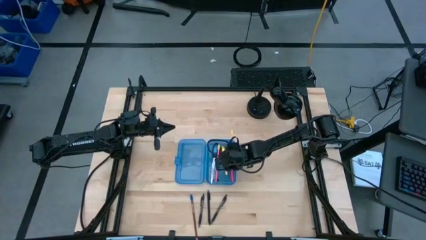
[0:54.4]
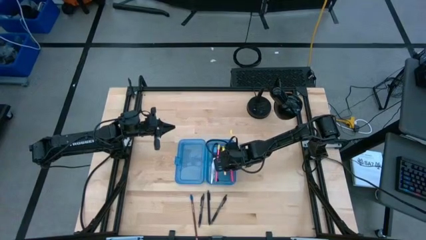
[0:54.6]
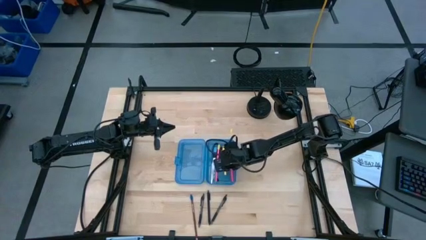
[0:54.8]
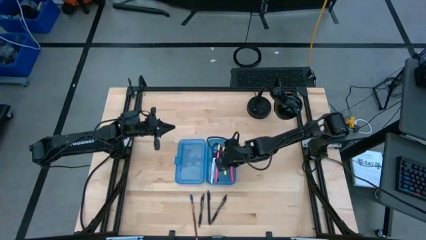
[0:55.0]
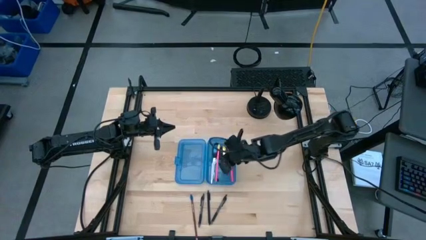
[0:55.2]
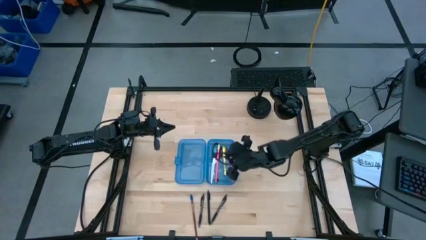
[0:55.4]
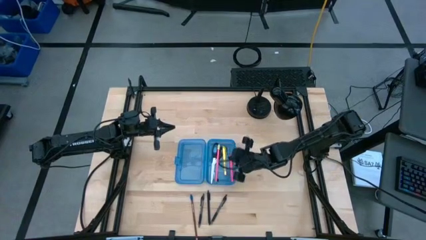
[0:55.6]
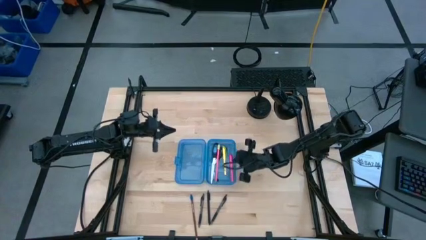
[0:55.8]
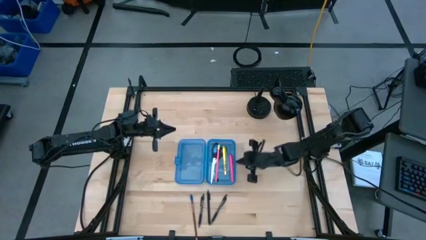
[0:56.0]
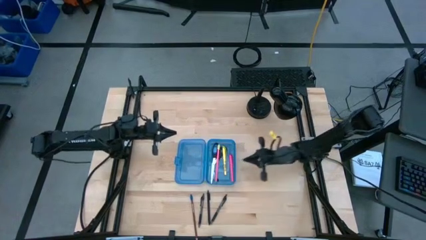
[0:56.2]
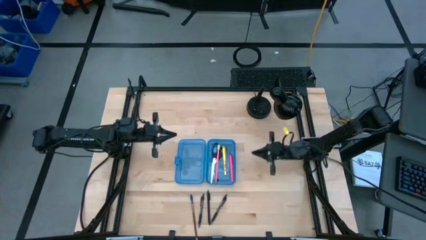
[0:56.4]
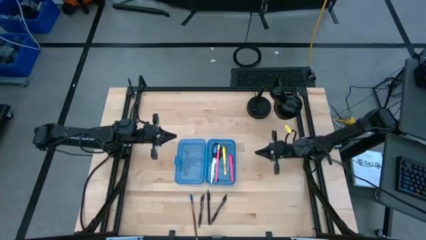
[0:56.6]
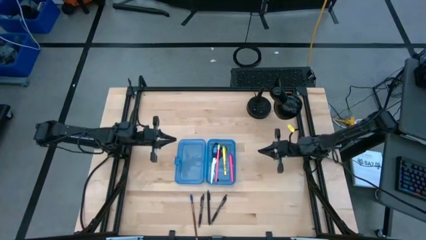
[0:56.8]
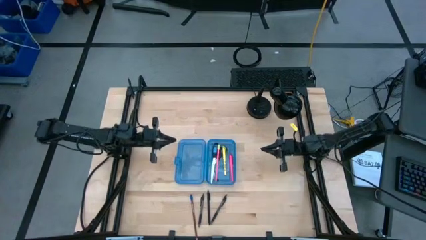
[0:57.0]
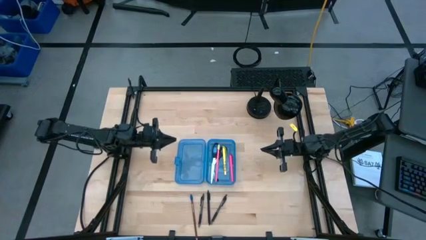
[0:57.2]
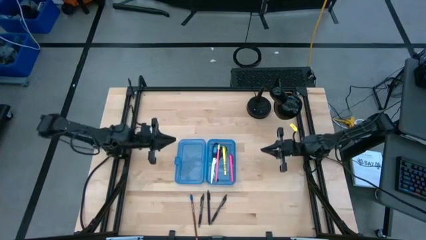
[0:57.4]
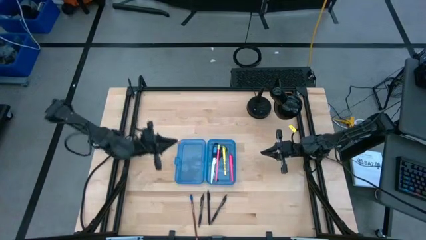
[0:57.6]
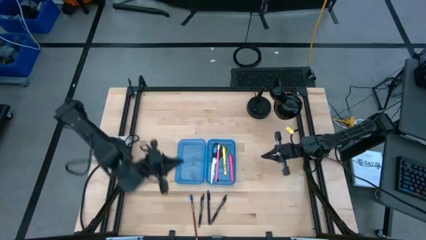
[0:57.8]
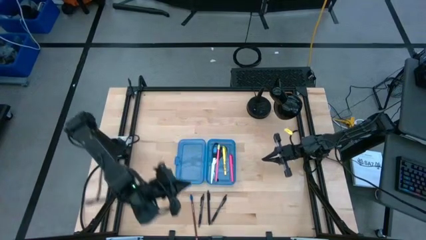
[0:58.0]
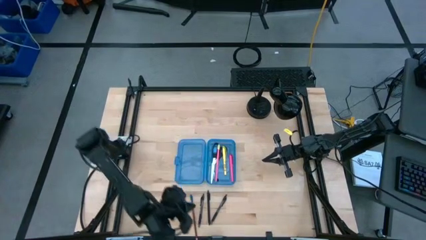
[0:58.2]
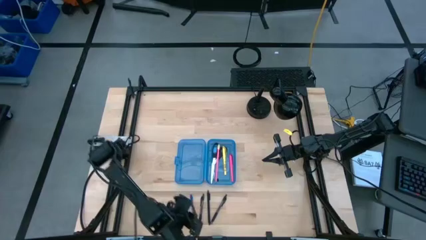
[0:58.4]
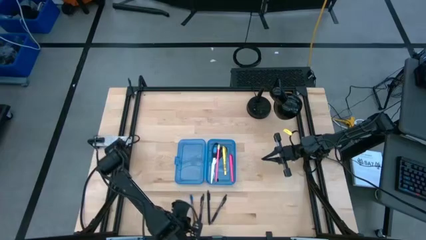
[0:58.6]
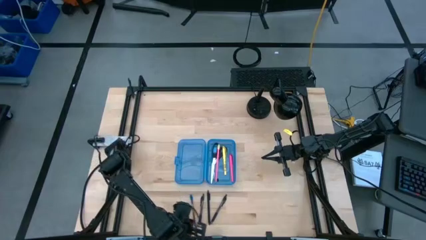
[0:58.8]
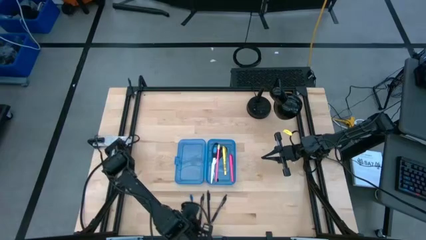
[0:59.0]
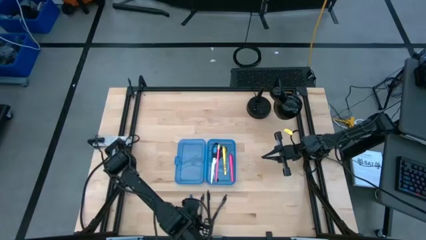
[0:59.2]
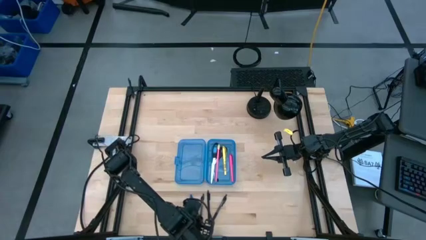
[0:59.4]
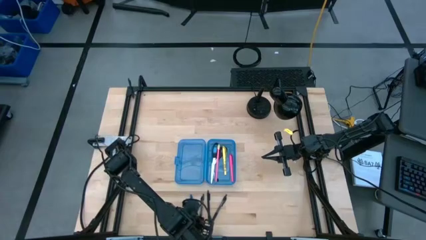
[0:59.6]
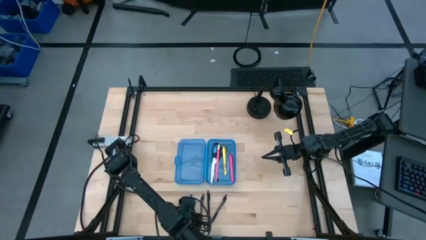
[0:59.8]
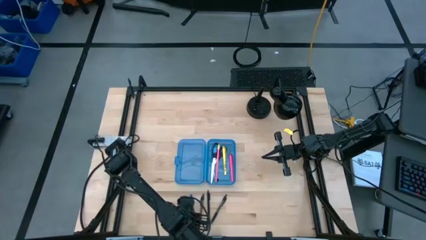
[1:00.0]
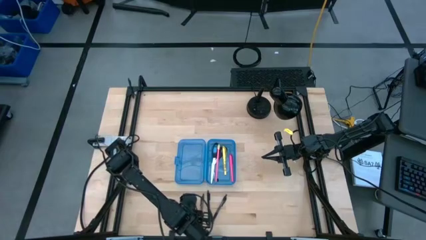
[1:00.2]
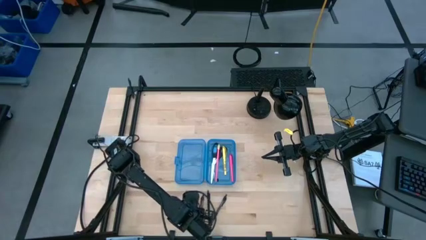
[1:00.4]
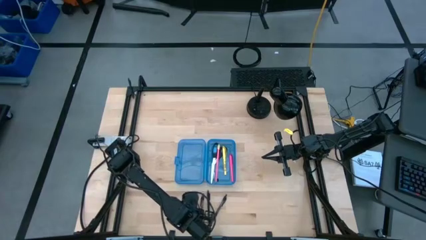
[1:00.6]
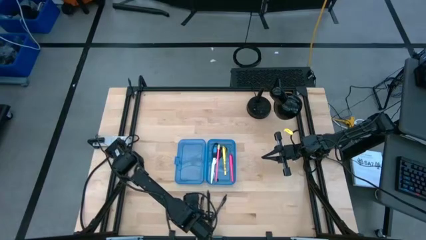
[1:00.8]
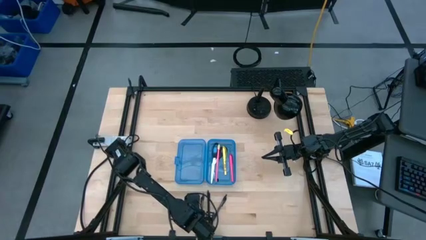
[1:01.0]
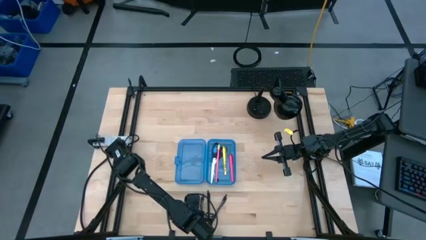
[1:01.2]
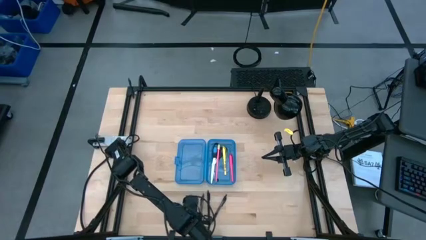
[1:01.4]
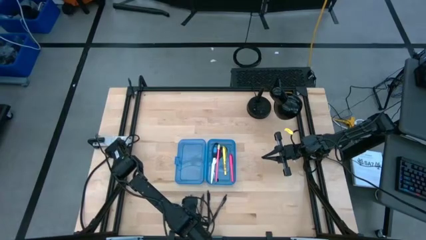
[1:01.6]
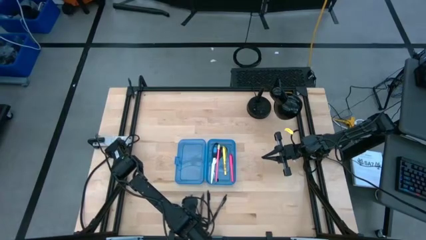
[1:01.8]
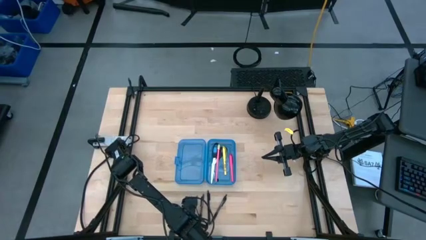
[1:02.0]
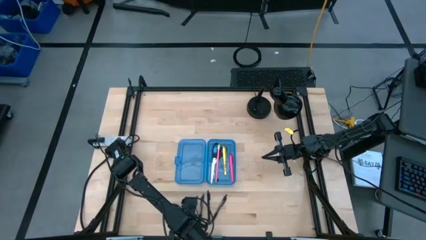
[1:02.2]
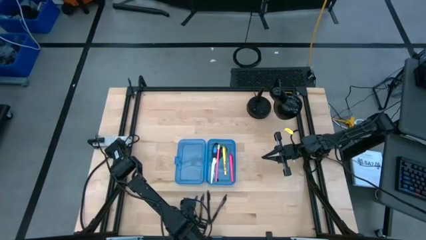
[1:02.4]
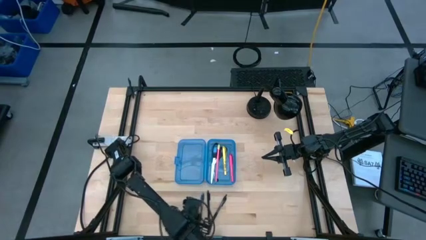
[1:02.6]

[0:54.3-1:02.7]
Task: Pick & place school supplies into a supply box
Put the brown pencil into the blue supply box

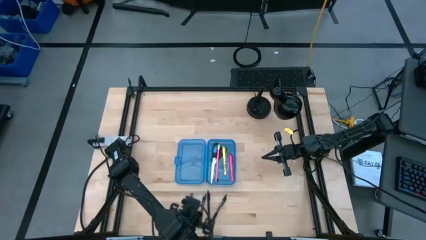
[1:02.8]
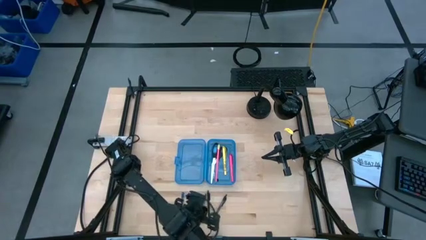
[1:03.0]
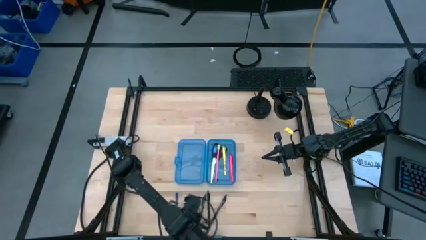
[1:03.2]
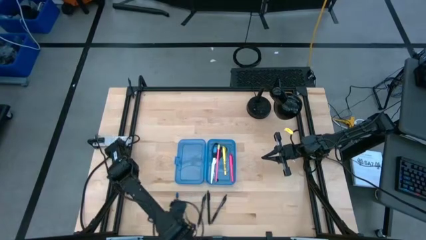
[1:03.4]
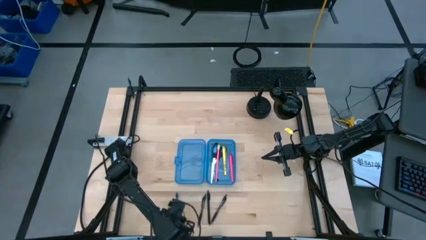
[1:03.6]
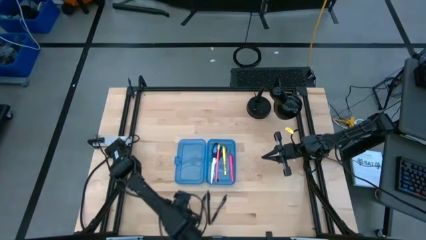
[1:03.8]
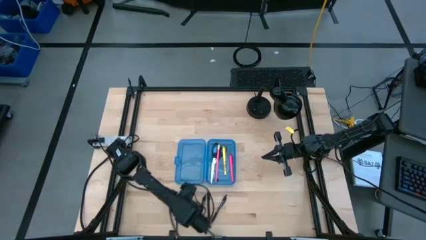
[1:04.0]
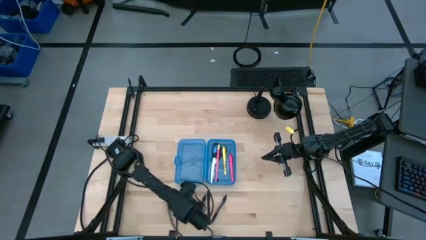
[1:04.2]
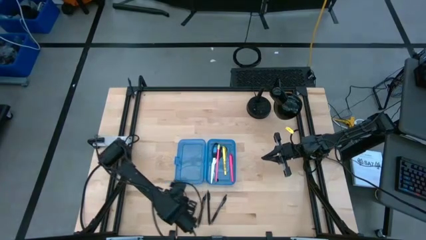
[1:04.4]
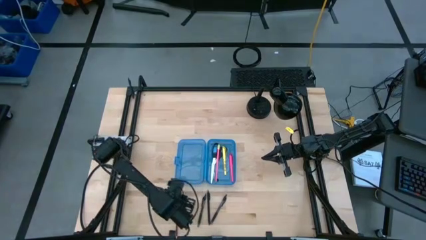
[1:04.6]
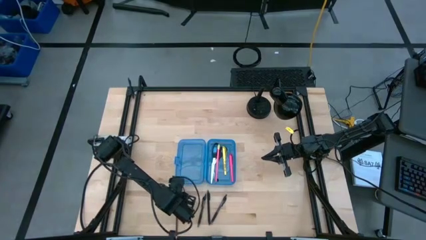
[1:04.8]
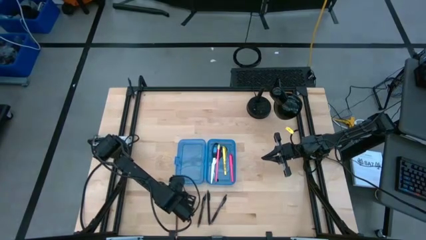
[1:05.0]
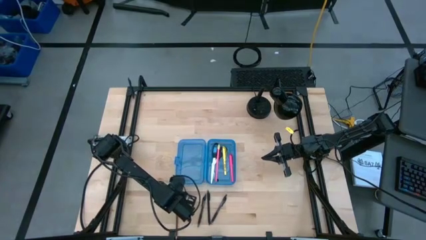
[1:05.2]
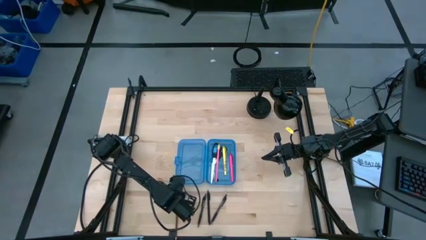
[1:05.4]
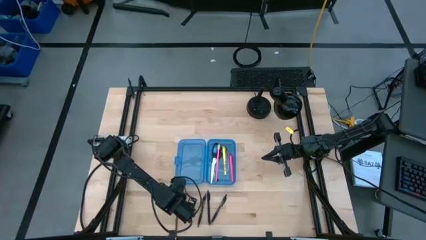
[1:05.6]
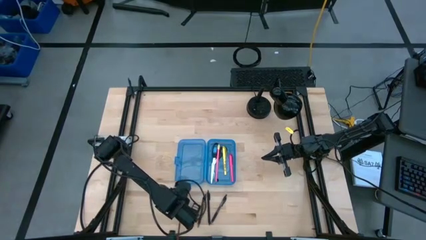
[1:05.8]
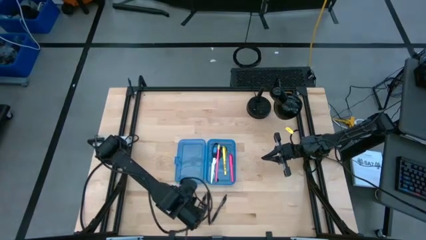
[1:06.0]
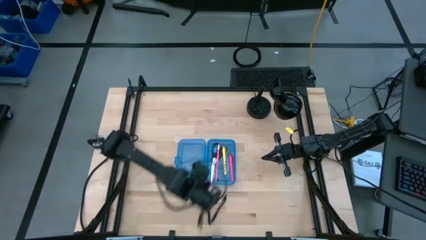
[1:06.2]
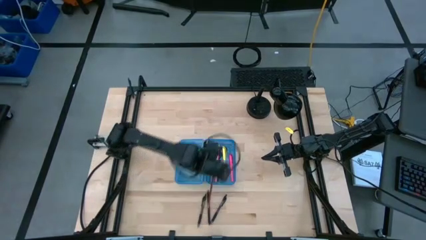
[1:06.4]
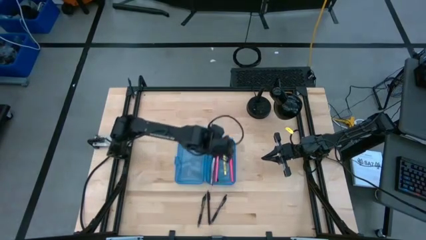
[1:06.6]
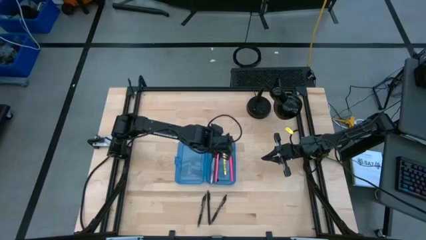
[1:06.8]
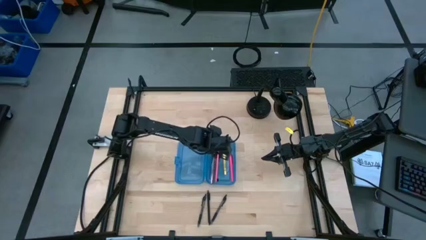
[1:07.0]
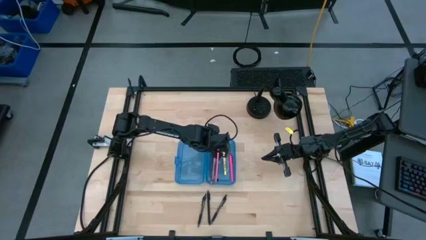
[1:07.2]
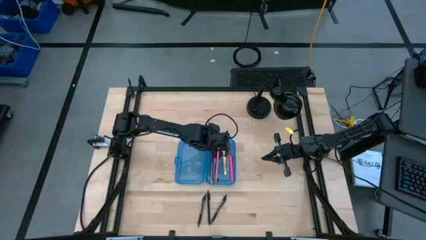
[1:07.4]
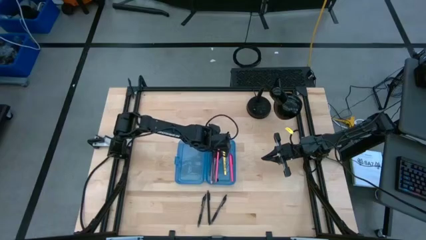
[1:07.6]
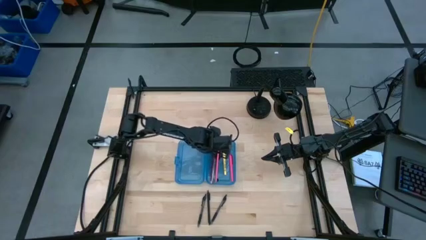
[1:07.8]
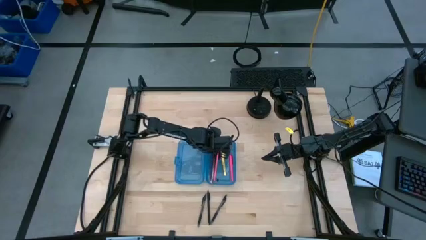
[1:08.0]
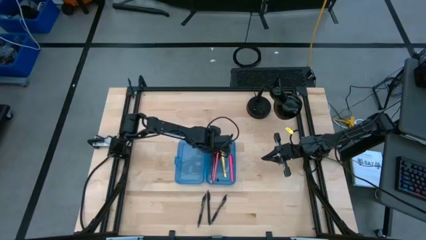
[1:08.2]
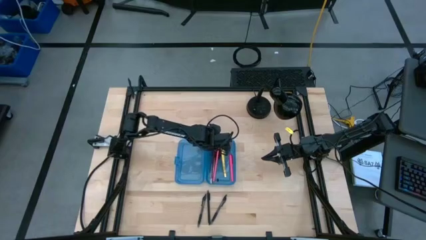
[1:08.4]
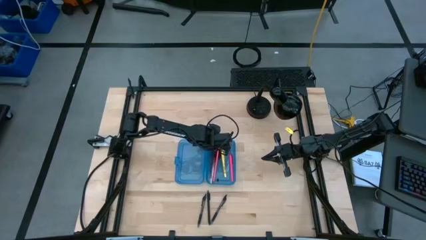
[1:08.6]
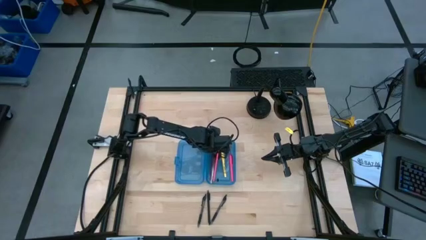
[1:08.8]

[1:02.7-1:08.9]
Put the brown pencil into the blue supply box

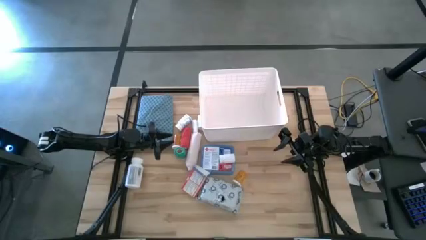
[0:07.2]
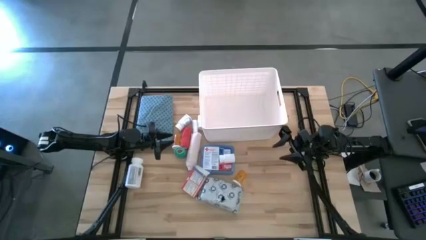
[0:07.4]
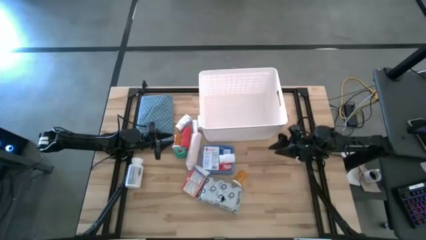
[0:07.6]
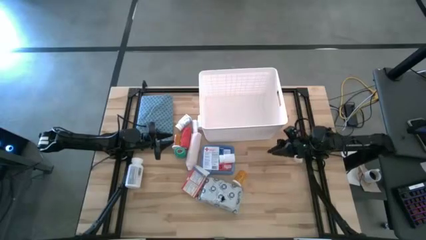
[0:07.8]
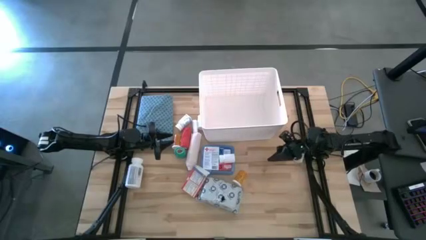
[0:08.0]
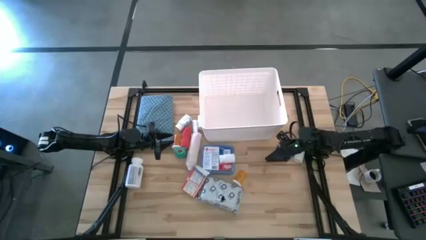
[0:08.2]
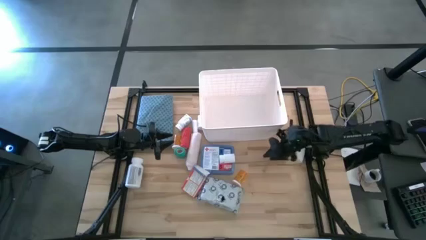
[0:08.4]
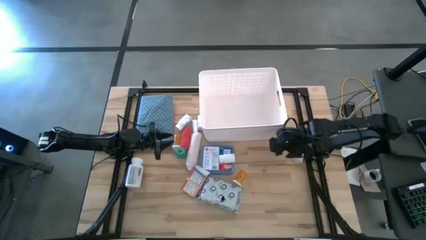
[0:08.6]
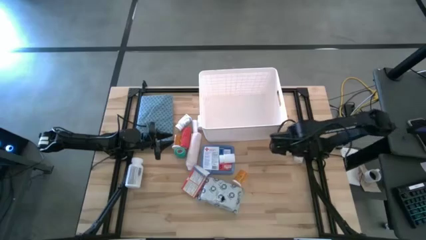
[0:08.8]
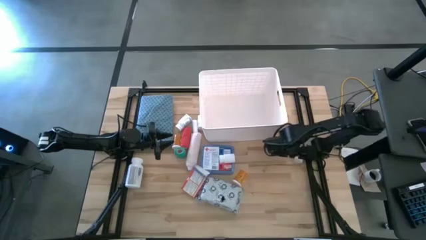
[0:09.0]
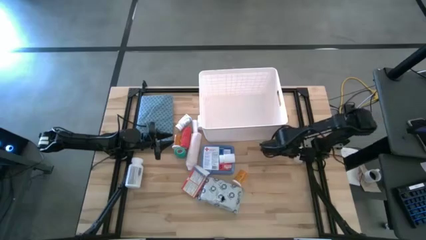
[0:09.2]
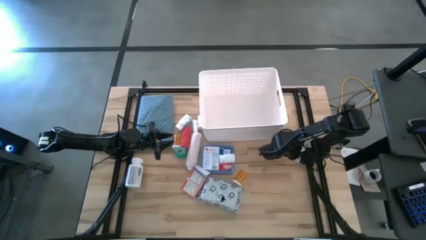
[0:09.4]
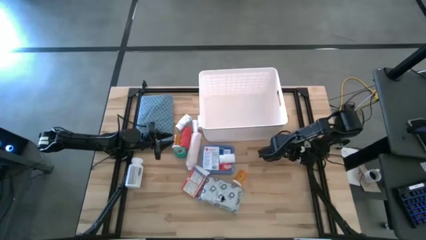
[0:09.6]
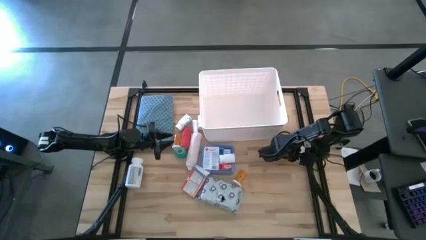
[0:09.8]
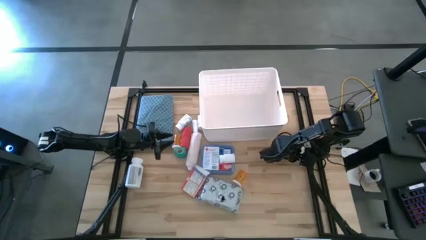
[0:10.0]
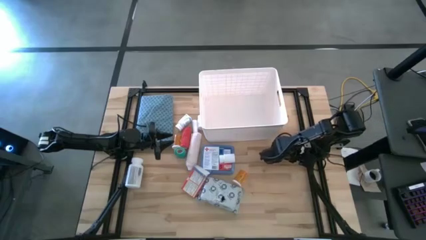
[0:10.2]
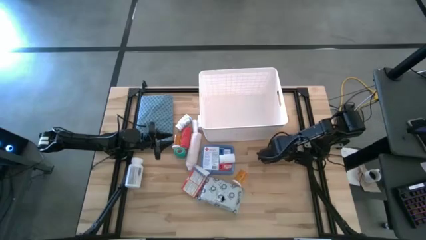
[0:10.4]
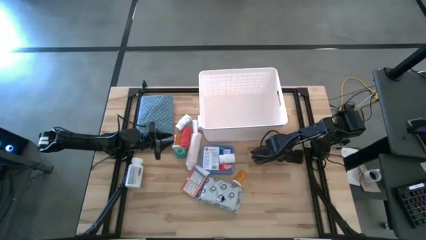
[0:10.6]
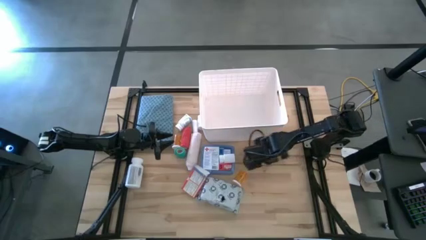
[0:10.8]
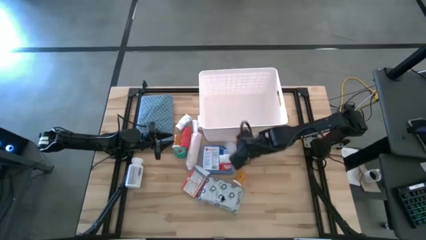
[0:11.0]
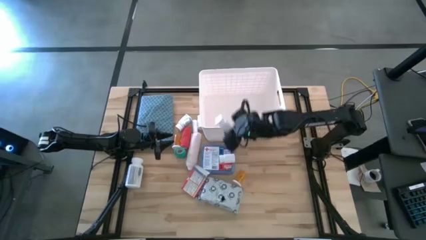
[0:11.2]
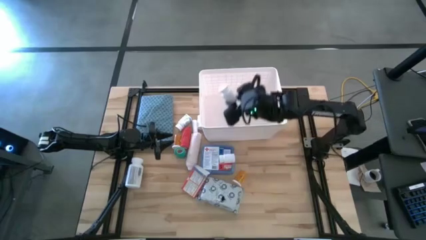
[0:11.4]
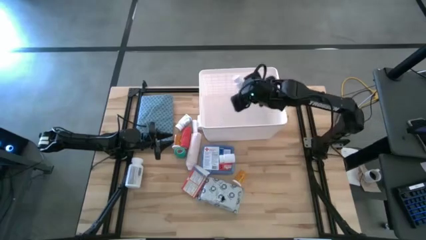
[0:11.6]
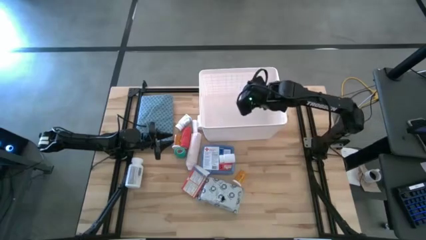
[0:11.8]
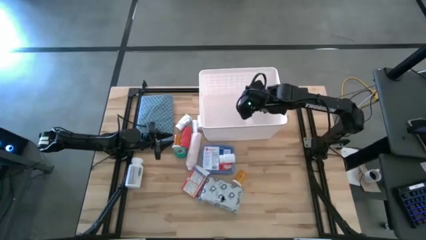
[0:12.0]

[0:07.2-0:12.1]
Task: Pick & place medical supplies in basket/bin
Put the white pill bottle into the white bin
